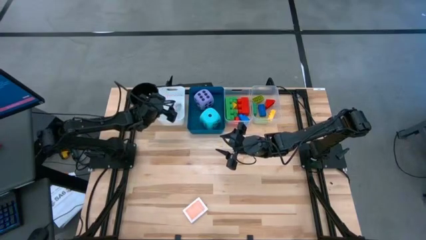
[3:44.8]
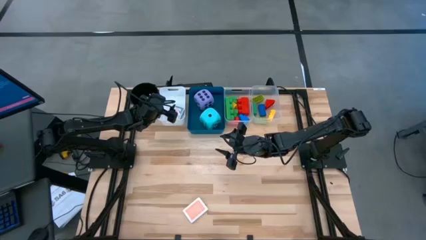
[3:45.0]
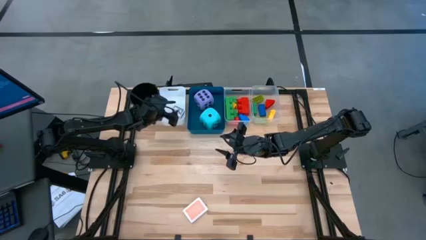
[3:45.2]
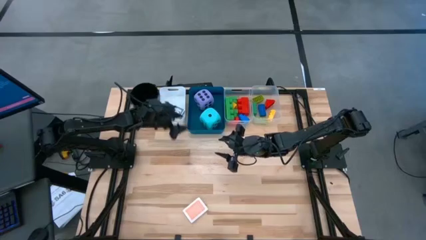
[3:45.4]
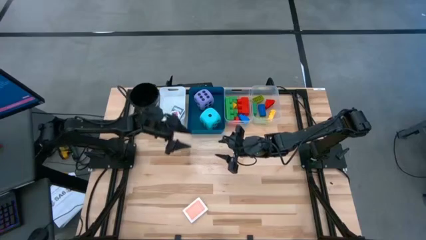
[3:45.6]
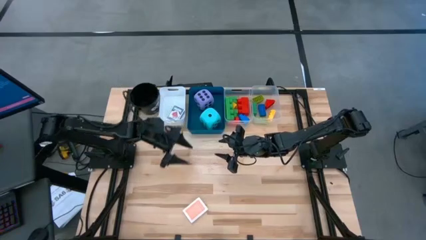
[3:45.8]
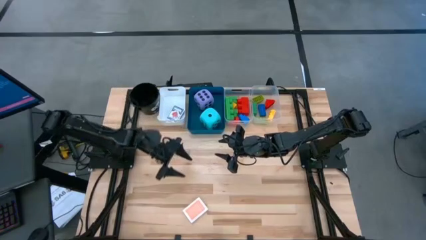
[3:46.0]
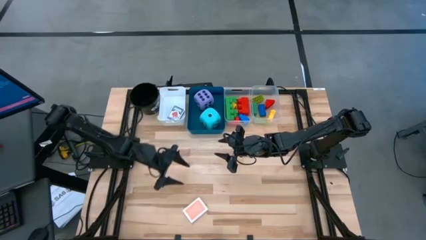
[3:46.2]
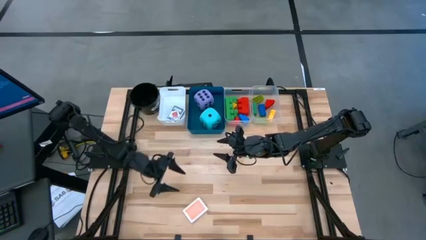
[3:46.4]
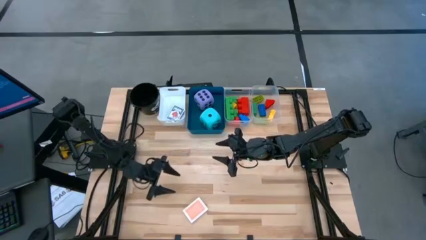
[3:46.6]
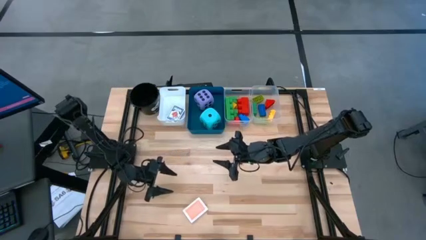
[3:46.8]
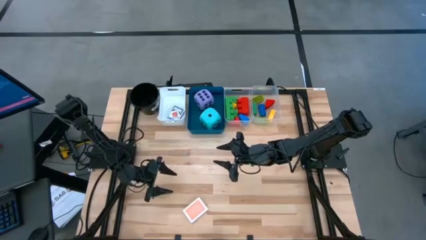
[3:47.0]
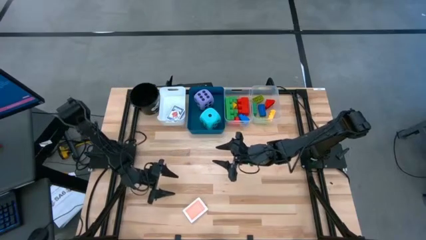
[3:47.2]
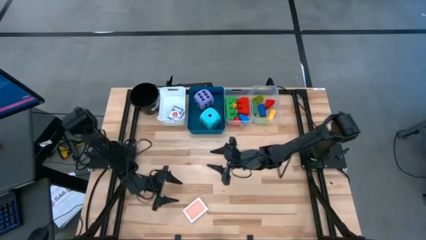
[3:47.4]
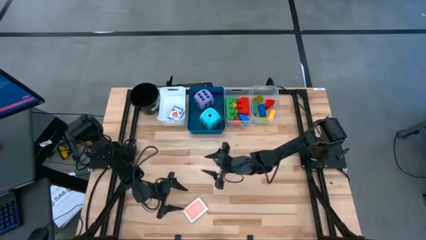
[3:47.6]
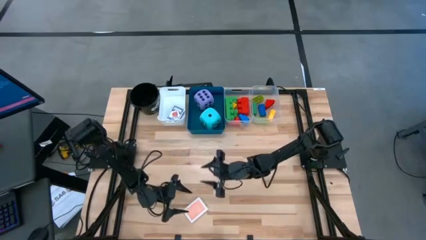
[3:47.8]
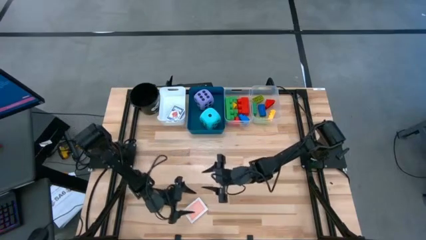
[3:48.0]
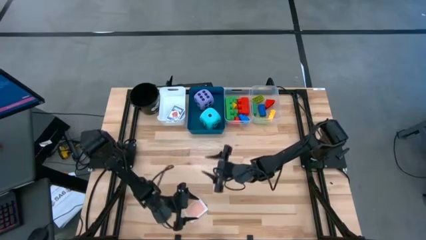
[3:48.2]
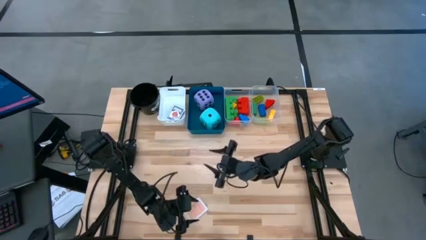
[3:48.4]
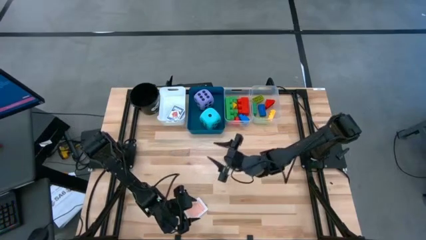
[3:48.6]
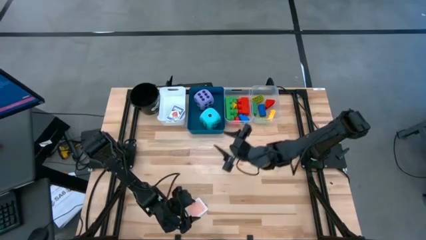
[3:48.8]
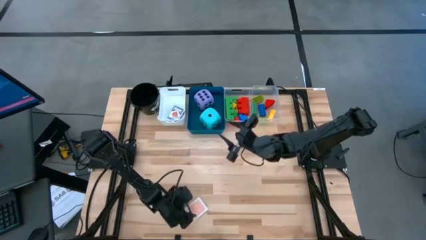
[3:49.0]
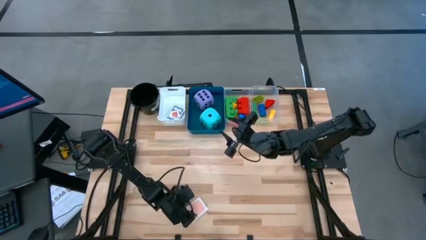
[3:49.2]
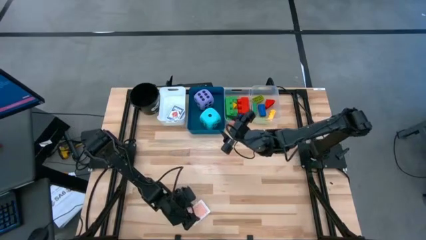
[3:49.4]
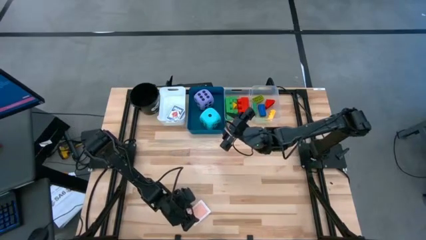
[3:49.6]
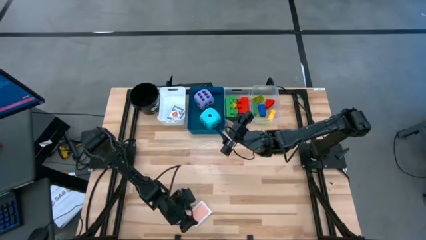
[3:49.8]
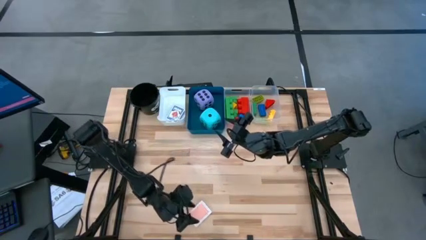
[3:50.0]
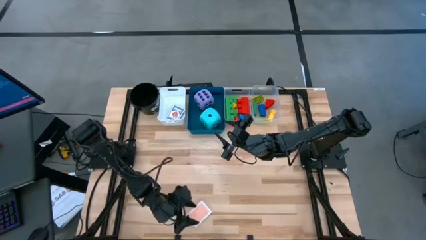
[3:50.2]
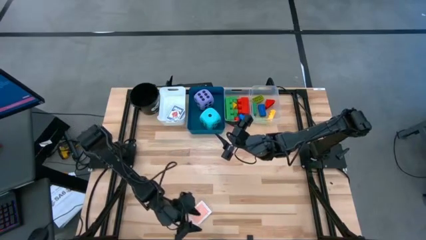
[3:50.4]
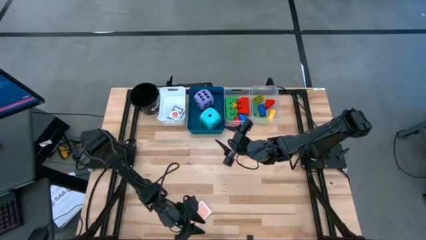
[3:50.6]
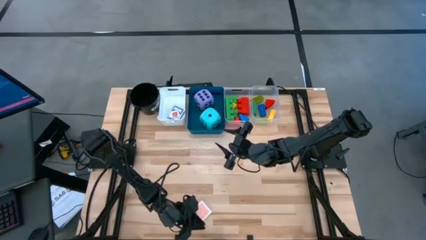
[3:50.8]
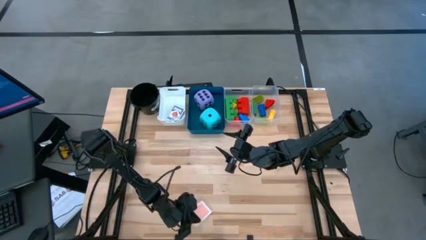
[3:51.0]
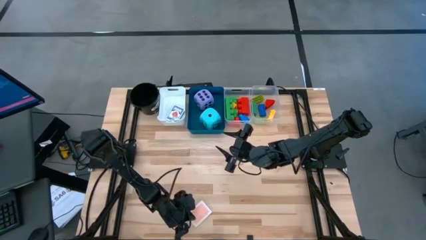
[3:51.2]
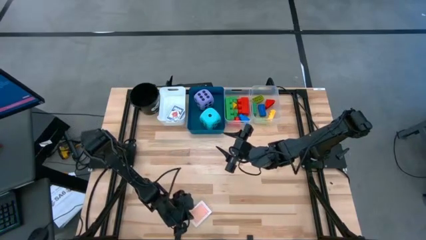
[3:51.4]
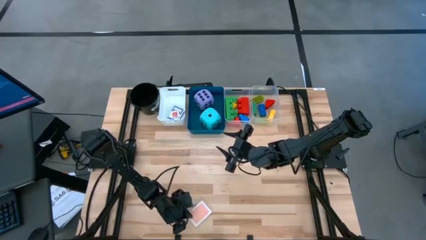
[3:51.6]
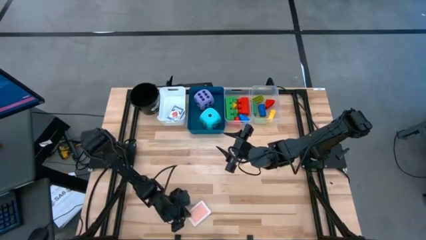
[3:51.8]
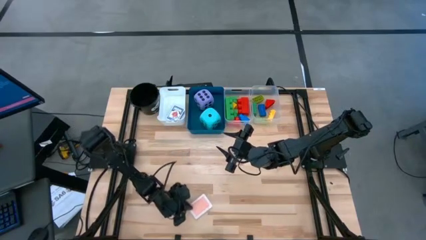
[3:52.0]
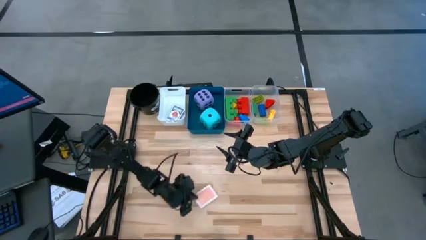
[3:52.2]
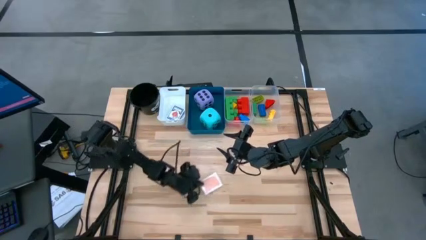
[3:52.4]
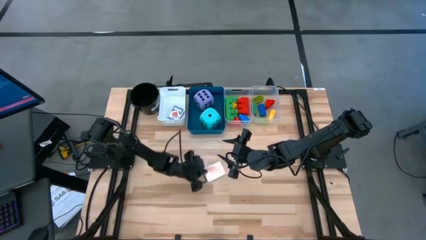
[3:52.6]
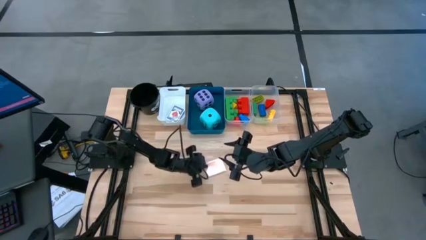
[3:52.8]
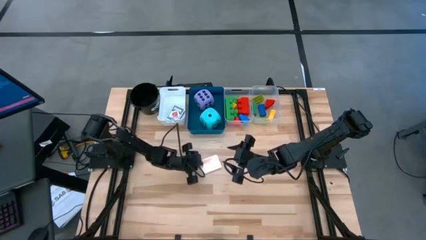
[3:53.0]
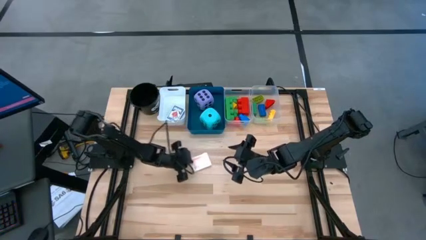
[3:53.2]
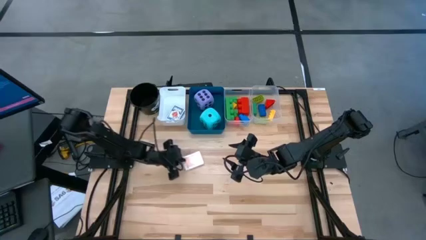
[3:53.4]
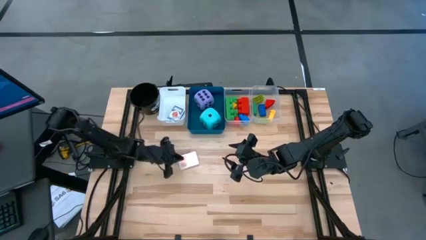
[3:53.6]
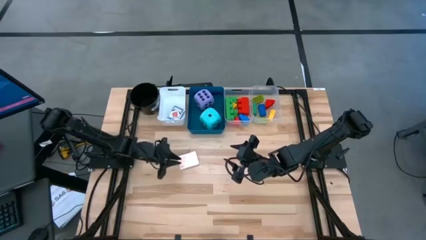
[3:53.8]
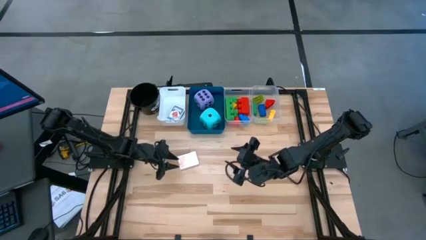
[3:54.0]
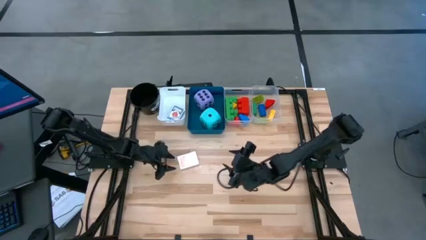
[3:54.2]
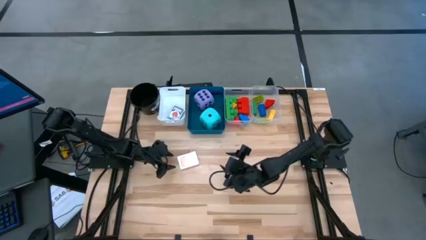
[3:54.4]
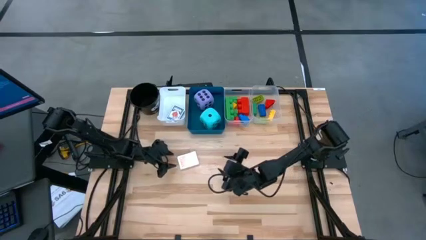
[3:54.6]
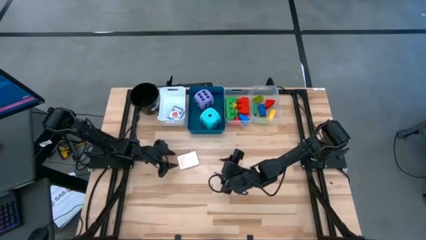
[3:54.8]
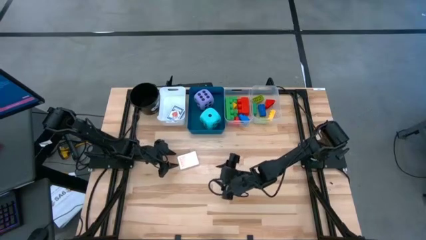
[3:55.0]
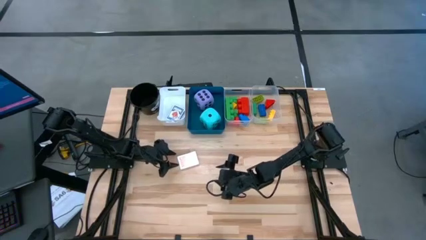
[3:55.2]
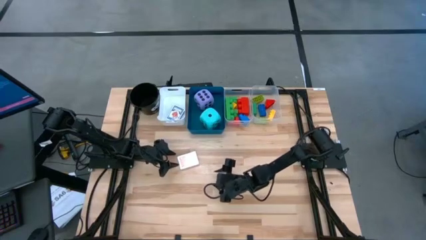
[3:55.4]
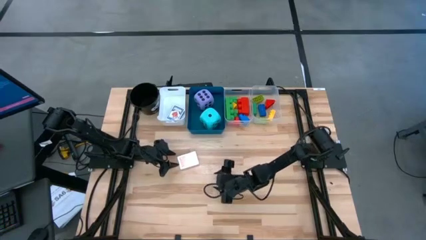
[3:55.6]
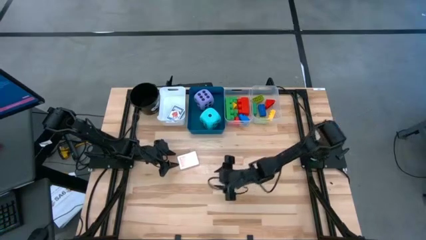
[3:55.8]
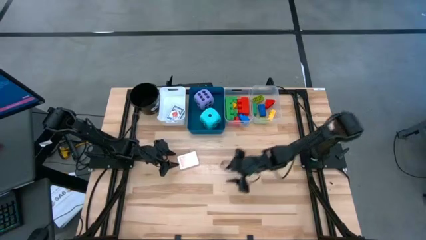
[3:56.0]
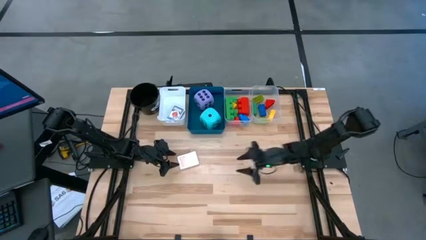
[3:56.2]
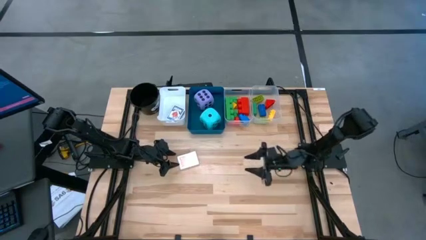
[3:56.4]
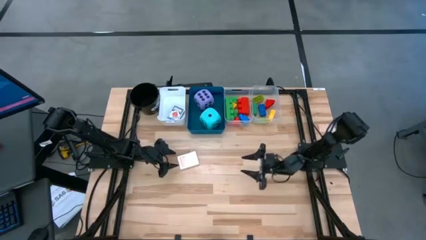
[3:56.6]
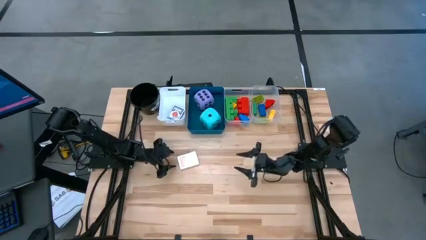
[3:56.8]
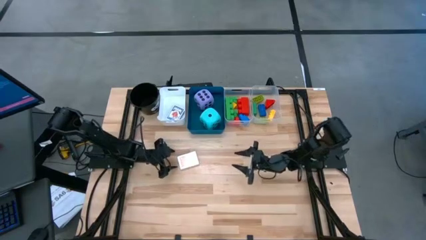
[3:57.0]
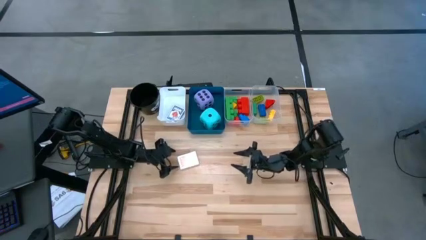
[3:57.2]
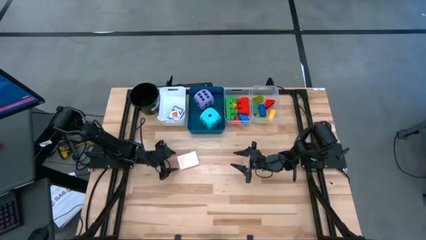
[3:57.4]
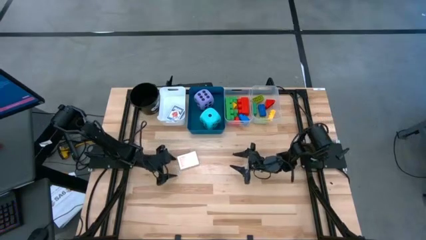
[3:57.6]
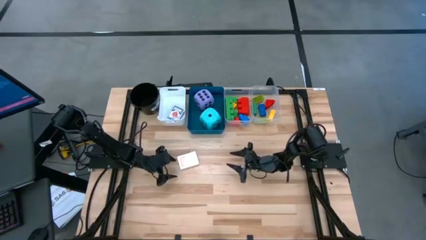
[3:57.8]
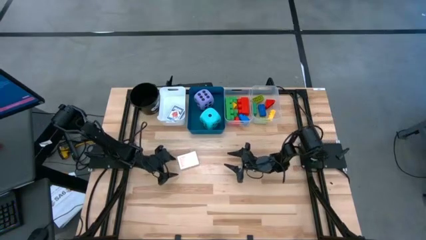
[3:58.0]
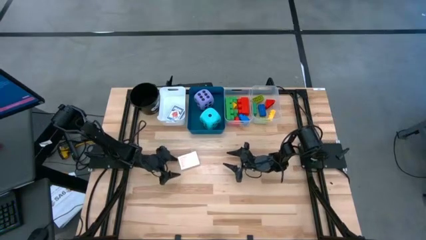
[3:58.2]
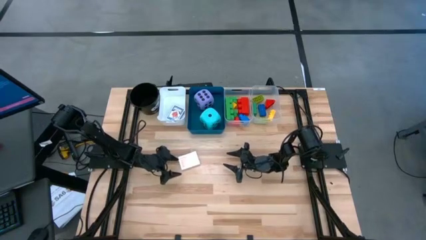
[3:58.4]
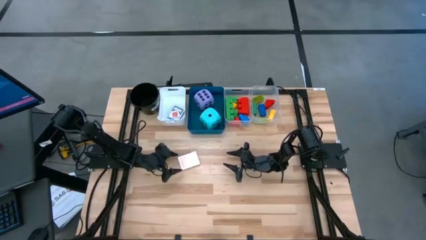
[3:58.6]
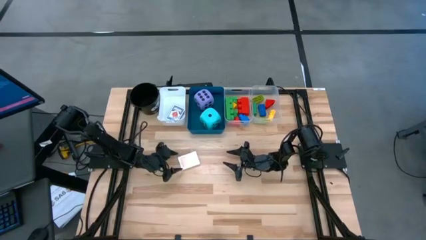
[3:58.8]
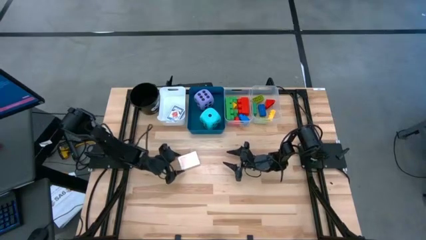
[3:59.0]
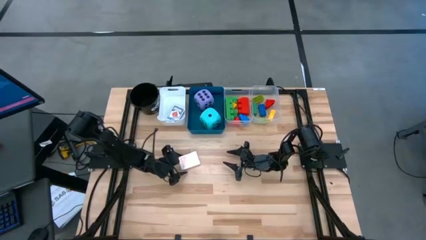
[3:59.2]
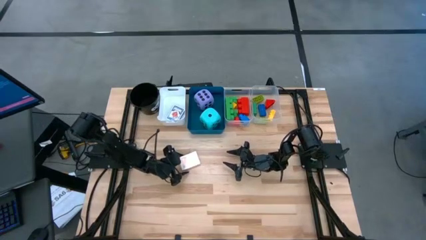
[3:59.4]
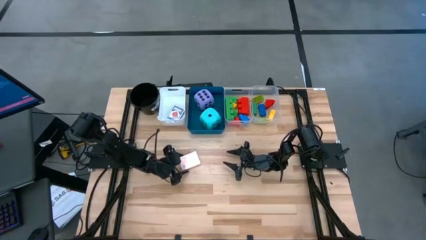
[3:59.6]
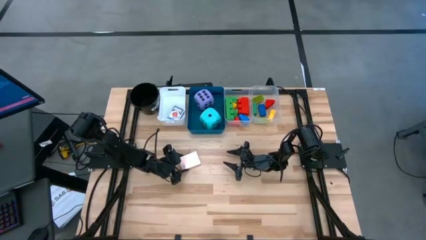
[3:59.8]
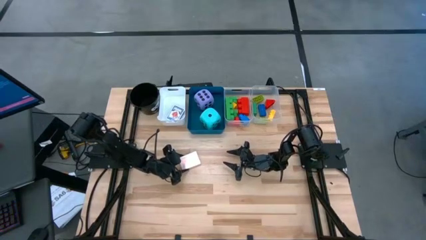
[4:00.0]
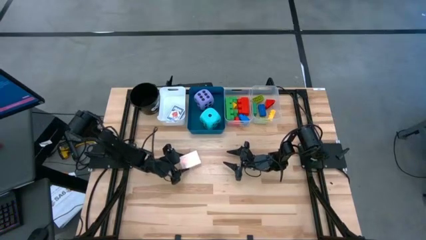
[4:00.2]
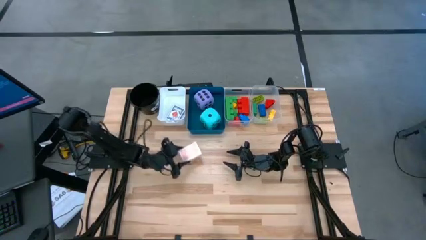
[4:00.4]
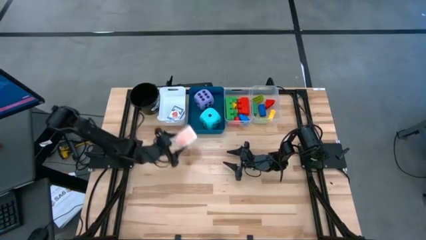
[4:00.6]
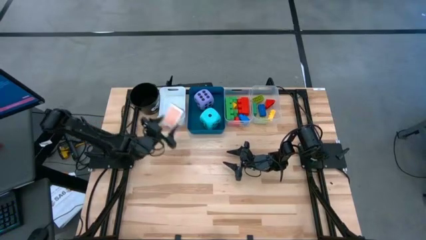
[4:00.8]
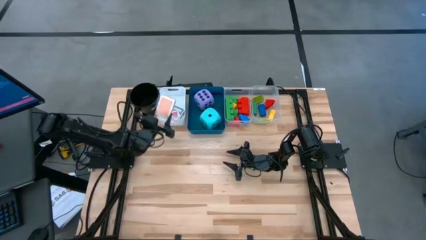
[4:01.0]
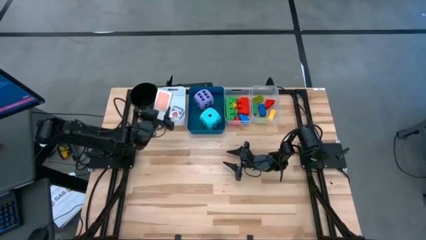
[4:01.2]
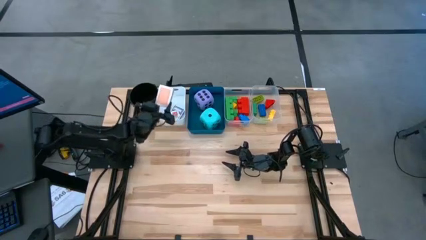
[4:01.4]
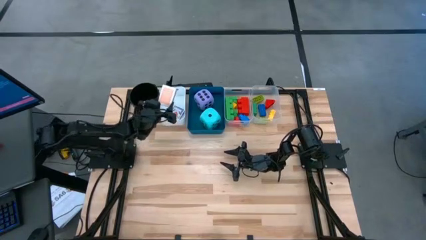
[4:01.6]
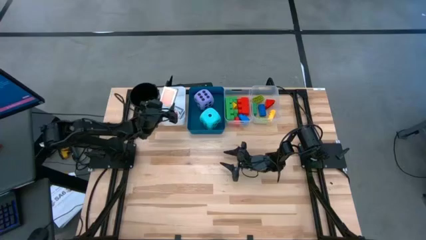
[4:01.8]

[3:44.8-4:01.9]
Task: Pick & Place Toys
Put the orange playing card into the white bin
